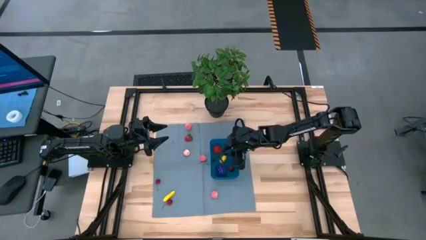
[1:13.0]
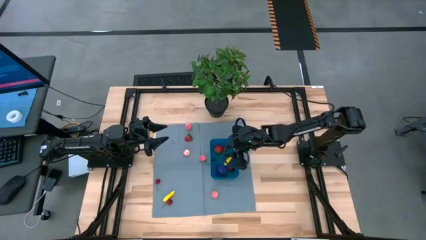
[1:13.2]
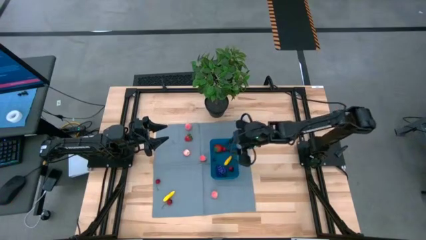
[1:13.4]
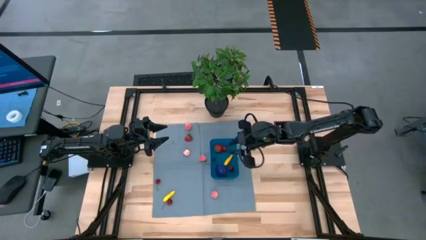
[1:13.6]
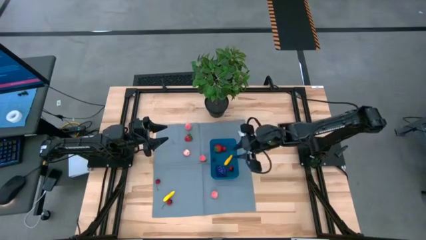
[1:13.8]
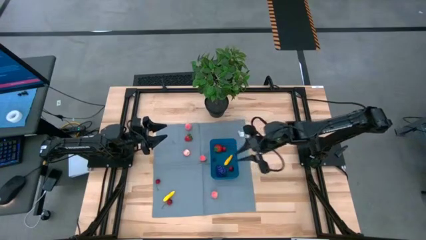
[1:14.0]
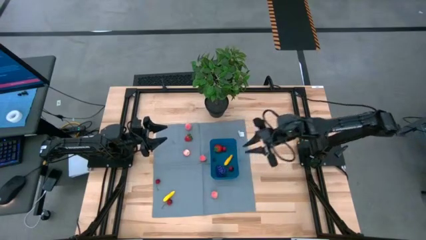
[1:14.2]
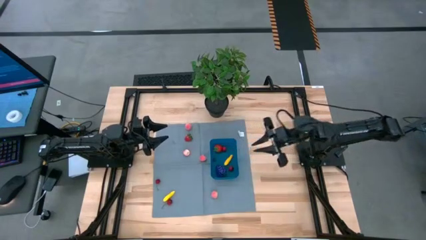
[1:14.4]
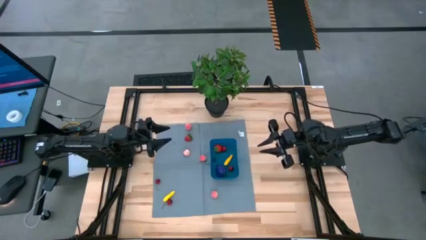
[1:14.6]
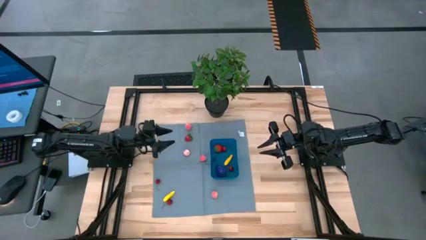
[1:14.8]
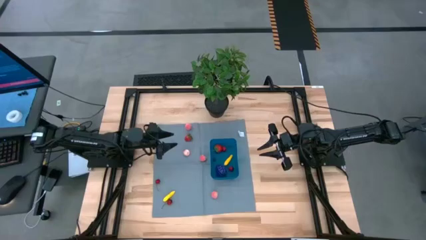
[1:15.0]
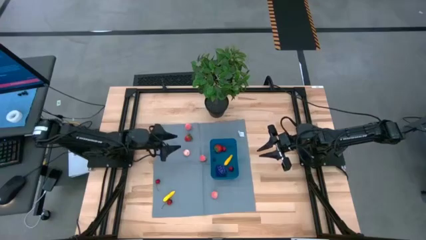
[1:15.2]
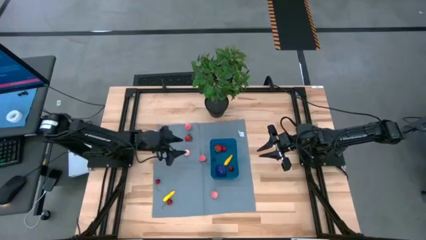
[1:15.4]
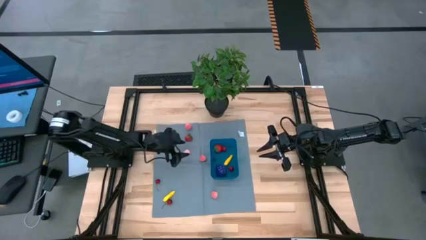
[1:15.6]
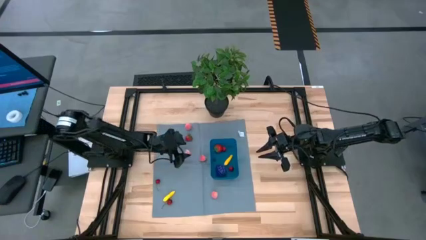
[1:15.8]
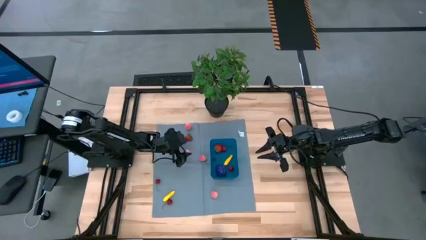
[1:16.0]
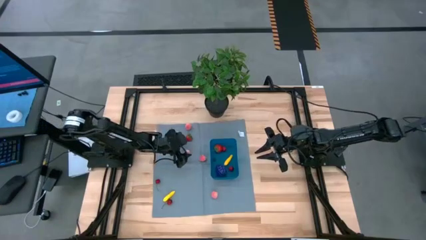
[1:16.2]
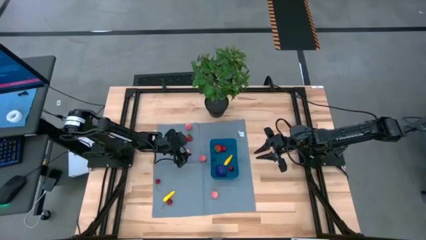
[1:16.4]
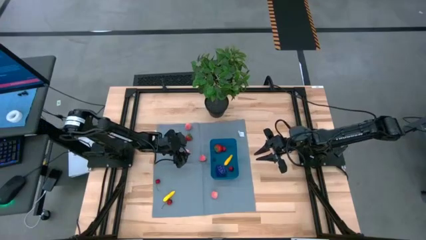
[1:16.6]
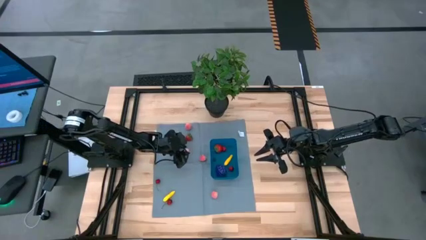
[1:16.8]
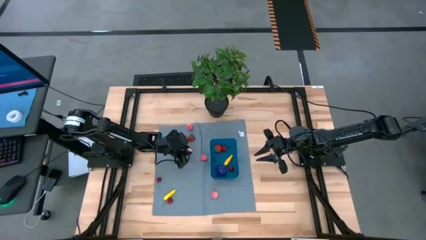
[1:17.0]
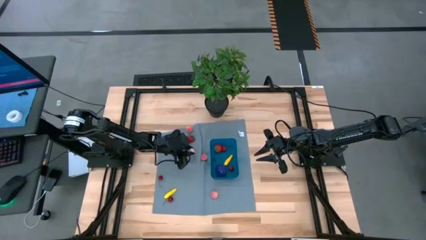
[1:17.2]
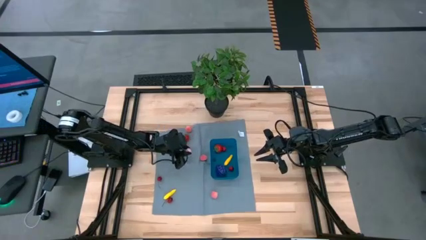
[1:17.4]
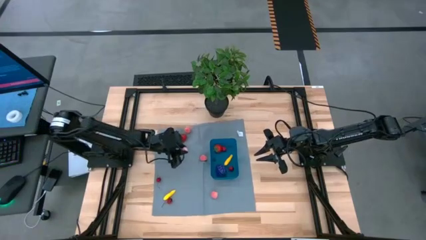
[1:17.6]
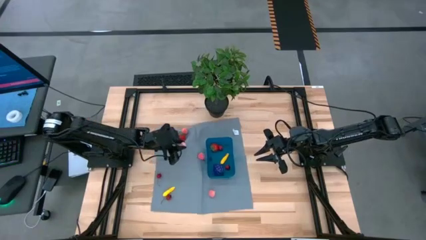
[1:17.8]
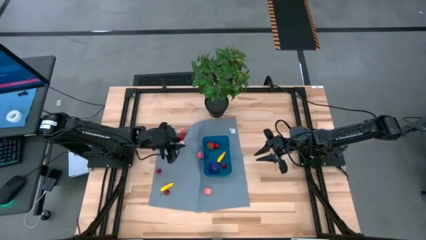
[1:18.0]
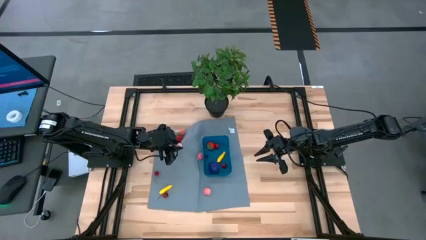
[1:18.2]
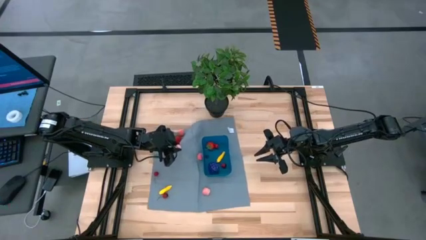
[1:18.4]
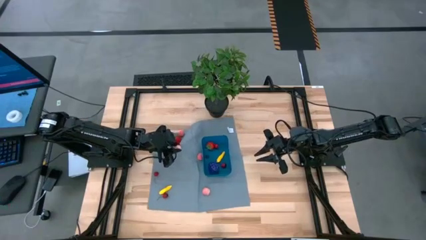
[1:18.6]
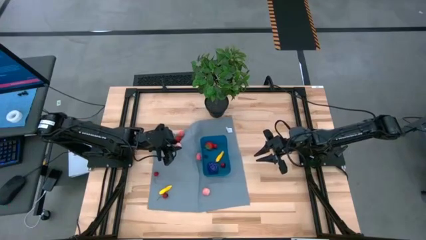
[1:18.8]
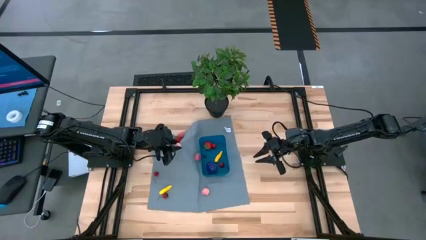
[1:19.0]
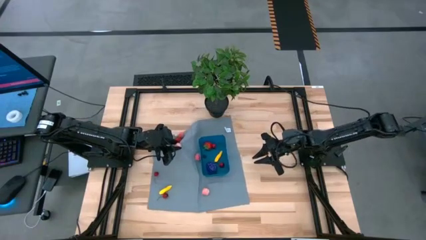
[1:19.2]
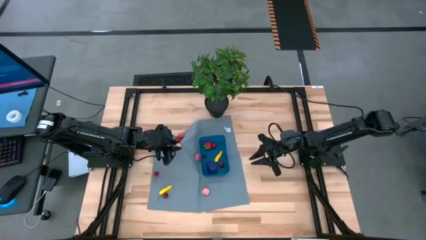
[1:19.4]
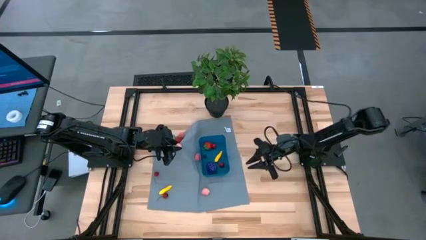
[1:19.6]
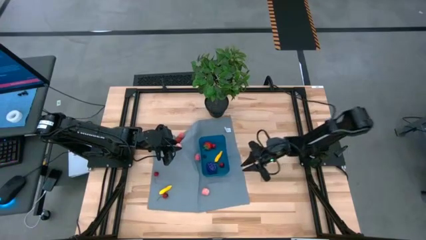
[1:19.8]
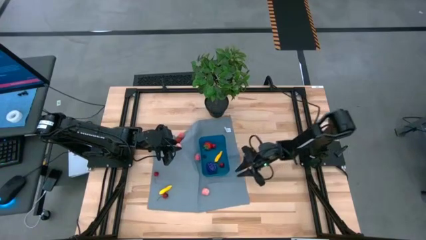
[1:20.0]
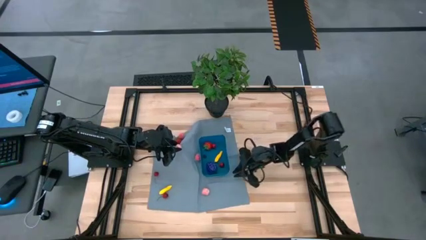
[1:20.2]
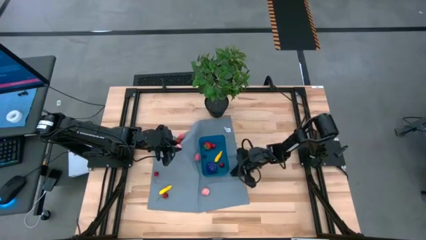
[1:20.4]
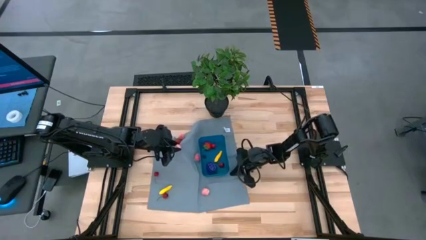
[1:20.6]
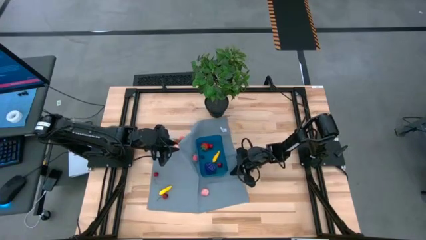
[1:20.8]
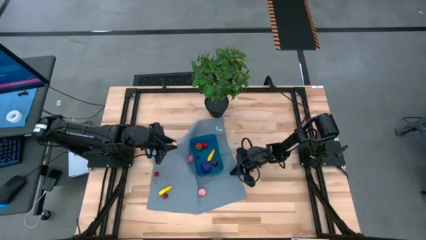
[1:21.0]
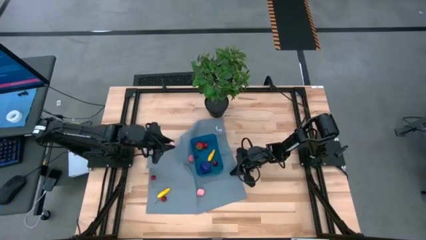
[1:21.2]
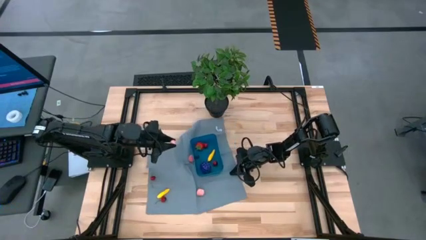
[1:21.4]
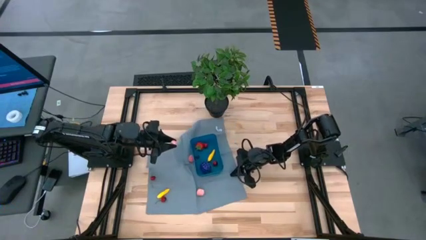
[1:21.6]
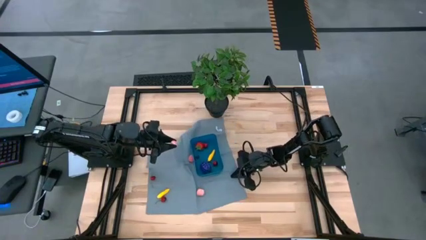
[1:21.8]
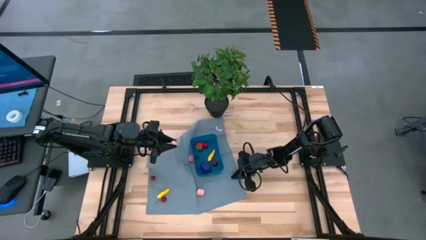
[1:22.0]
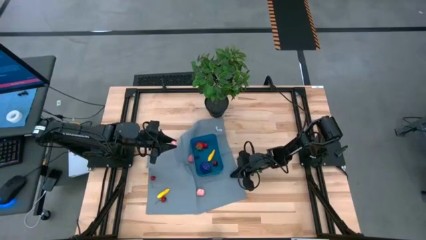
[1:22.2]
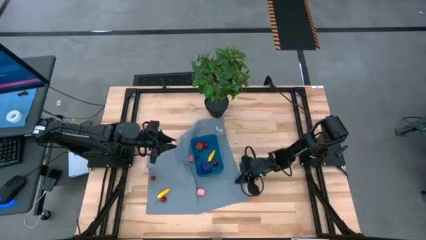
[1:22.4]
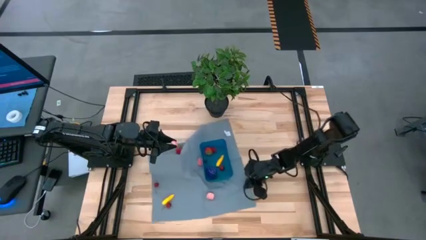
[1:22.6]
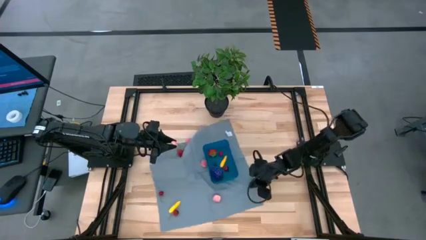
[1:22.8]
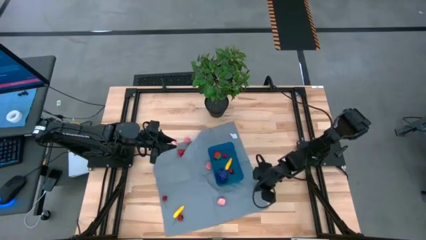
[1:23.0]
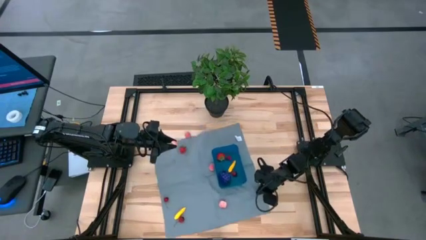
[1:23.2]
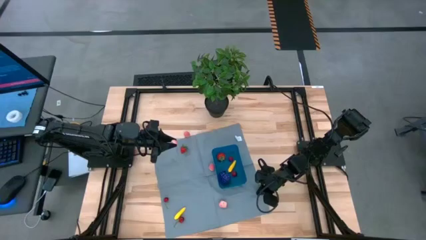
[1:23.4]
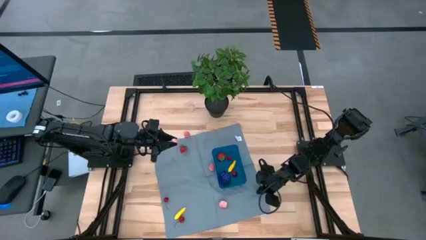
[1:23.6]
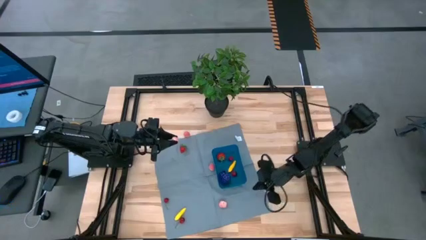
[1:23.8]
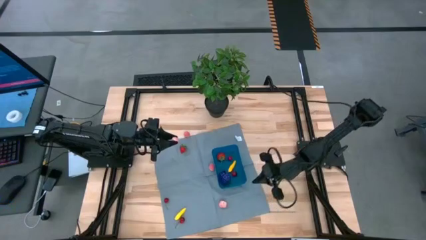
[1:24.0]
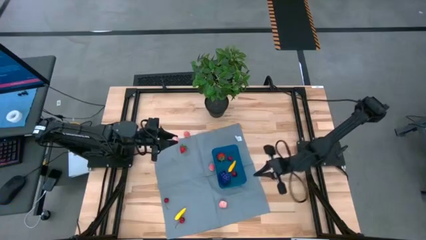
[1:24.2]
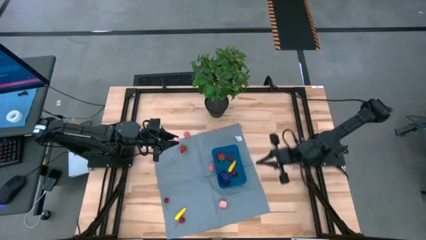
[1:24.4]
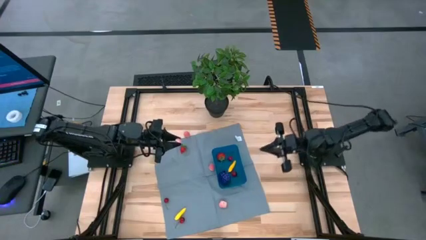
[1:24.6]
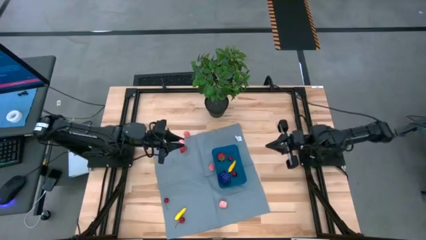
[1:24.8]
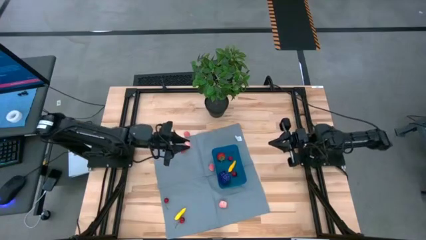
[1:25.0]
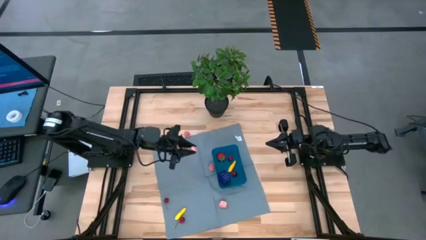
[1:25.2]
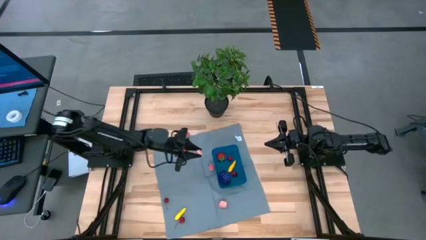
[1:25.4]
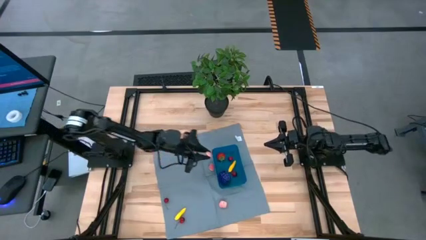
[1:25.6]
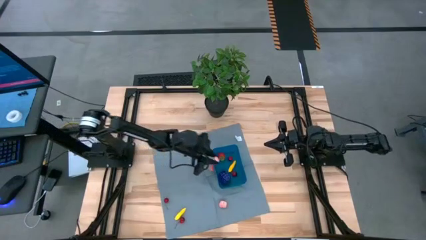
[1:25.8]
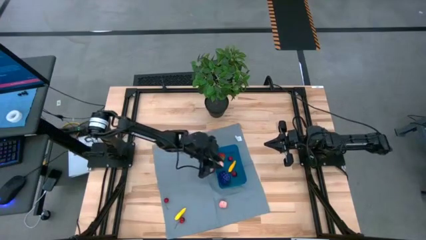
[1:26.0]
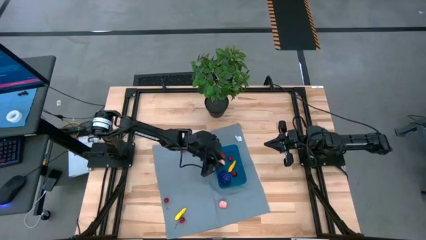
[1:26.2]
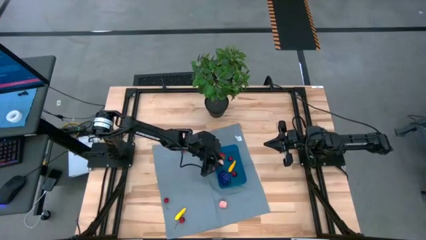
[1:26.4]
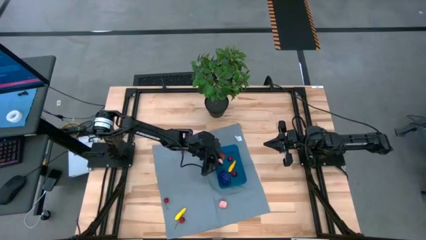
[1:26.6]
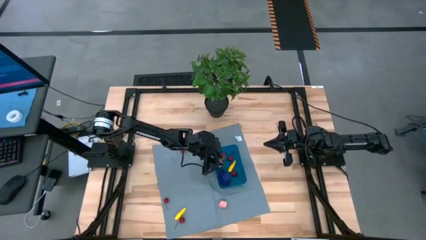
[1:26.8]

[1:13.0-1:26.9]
Task: Pick and placing Produce into tupperware
Put the peach into the bin
